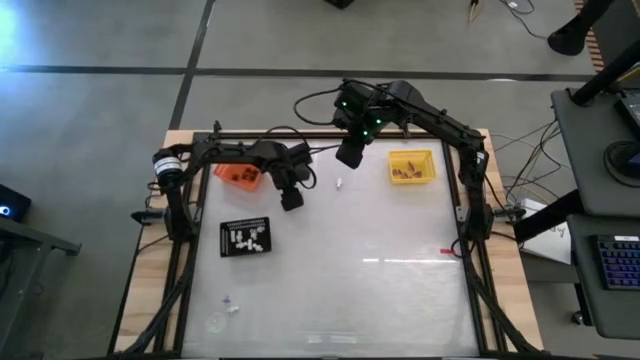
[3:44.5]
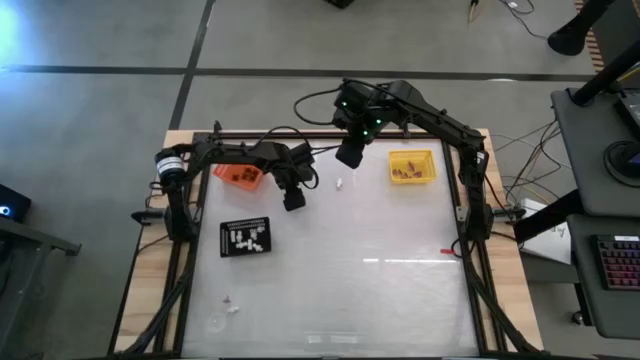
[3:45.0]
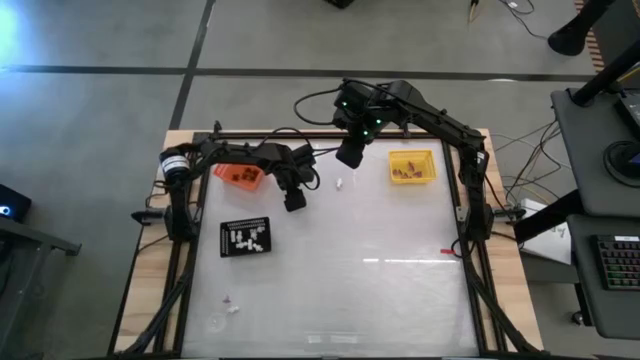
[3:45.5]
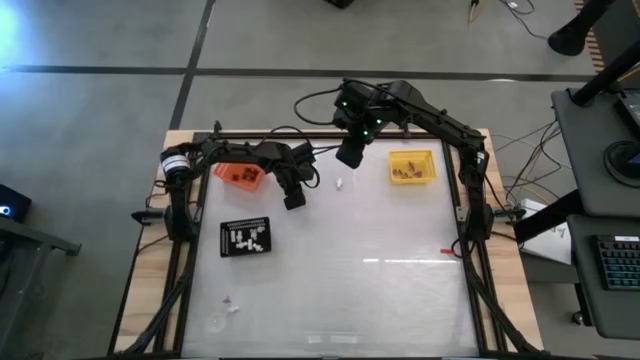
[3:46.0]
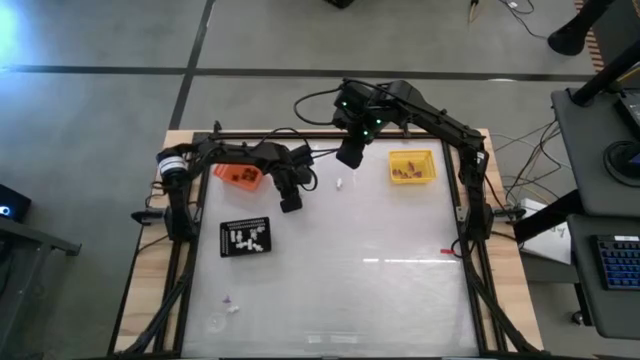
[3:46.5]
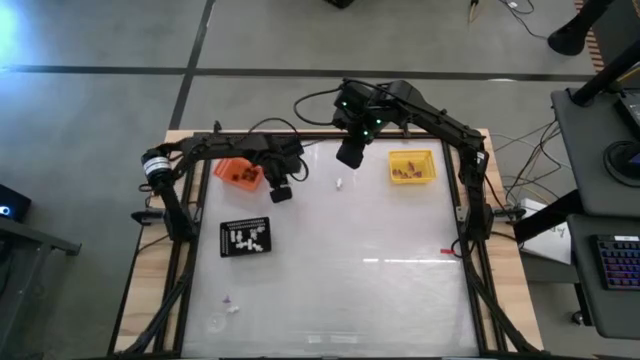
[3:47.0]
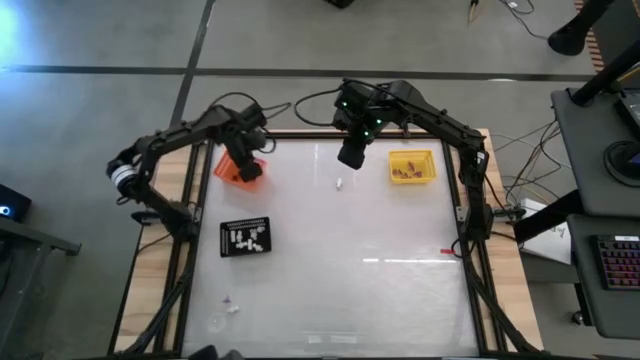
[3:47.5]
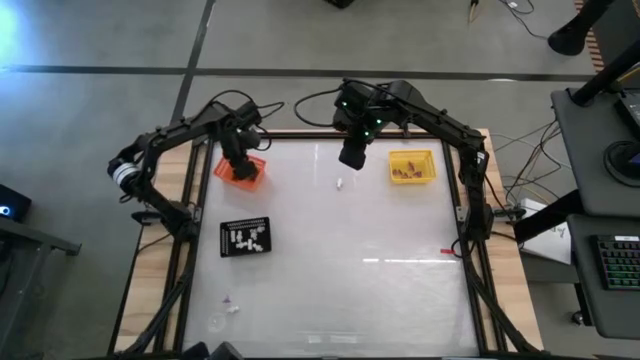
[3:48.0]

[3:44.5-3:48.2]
Task: Sort Halloween decoration
Put the black spider toy into the orange bin

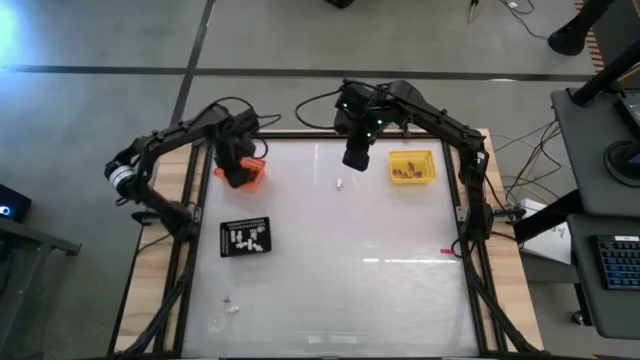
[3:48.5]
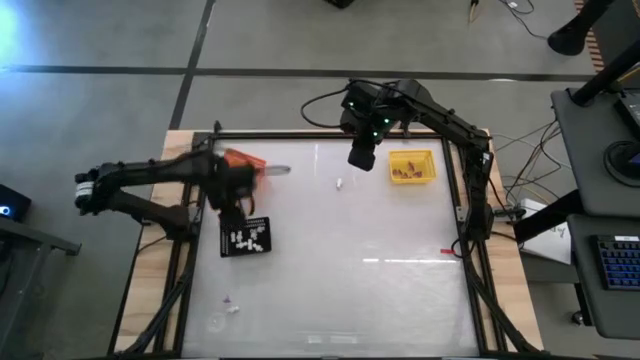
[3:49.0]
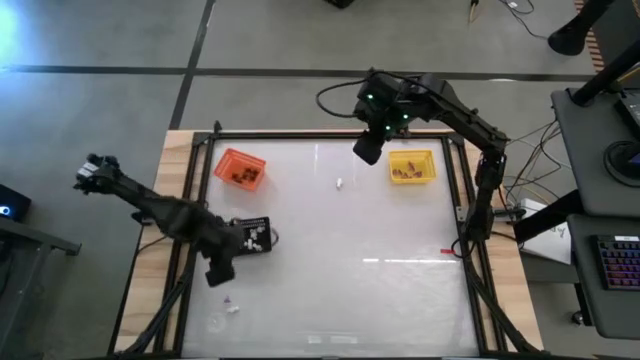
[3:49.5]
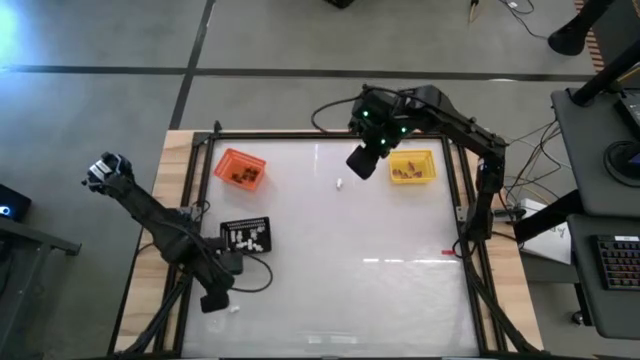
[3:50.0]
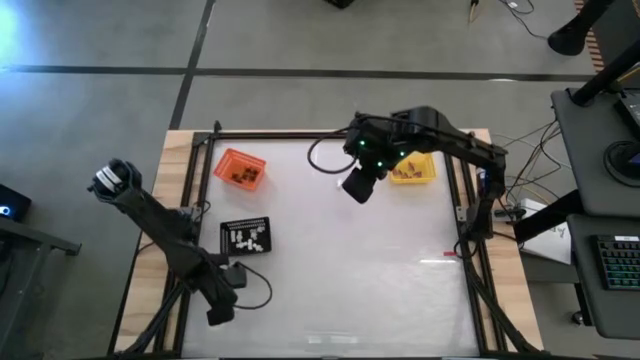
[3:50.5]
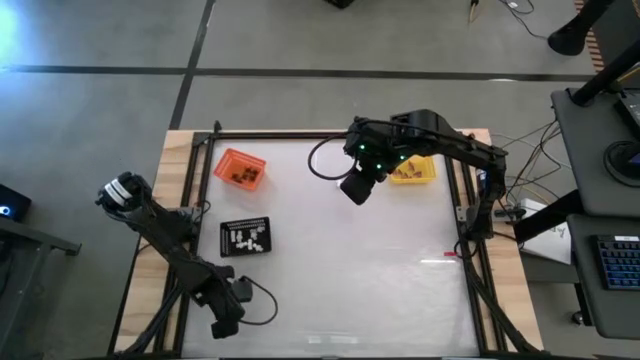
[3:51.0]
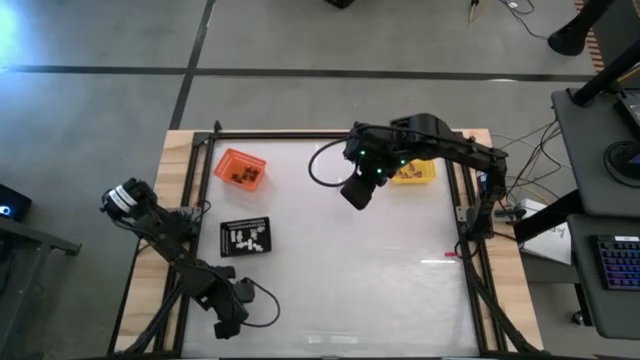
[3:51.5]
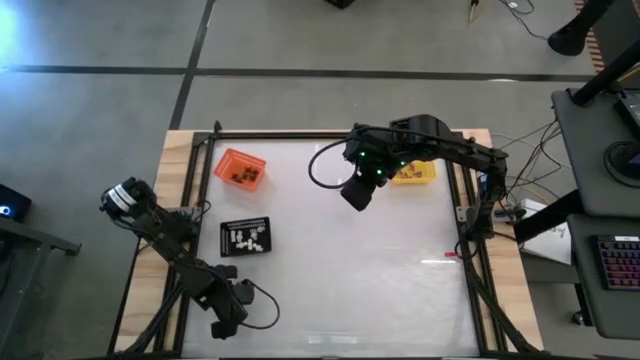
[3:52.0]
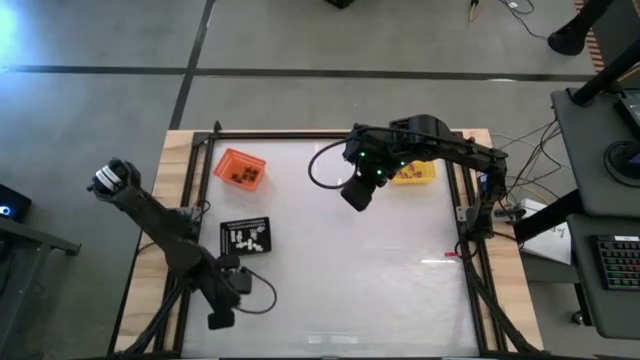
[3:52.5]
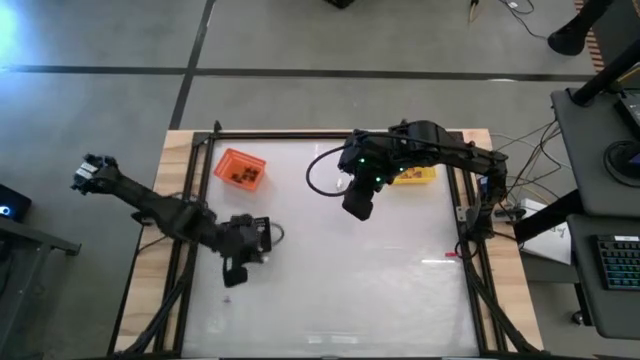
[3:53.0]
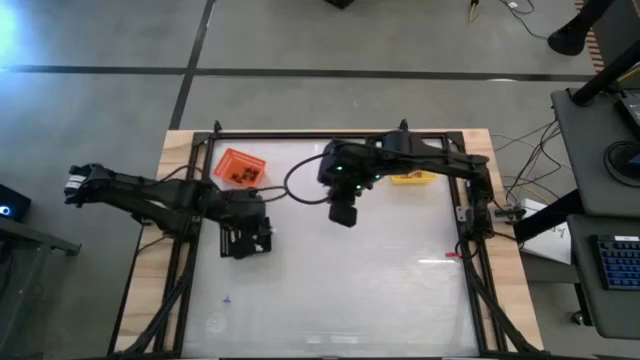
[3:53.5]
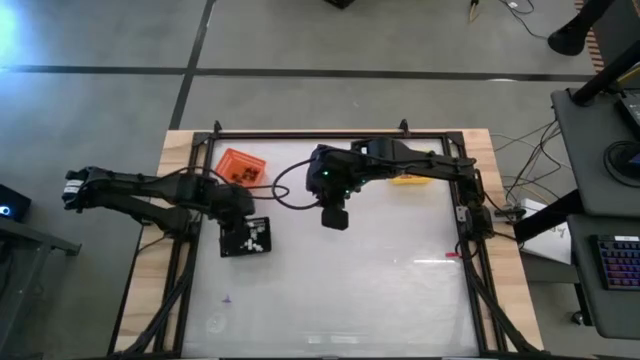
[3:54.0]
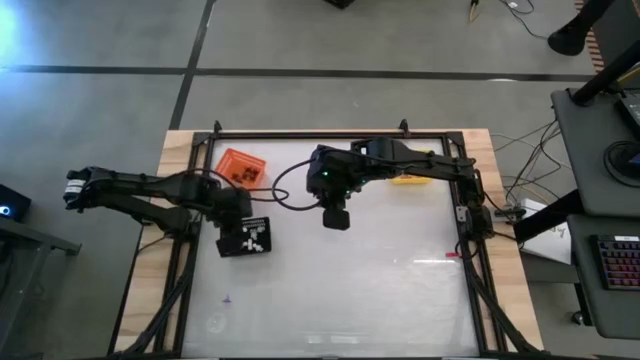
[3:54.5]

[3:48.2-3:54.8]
Put the white skeleton toy into the black bin
